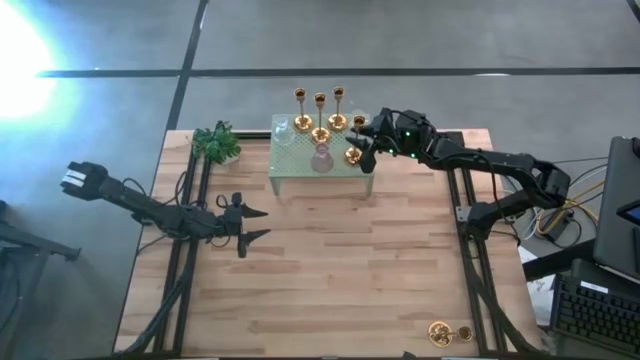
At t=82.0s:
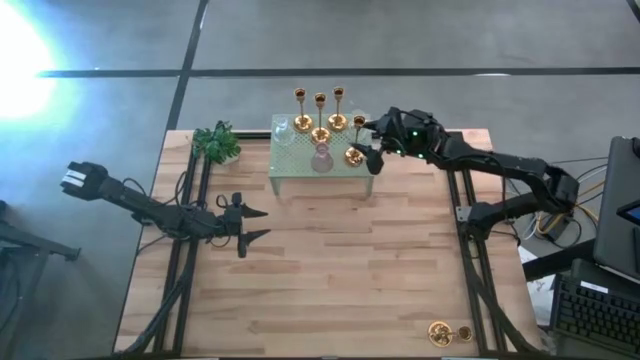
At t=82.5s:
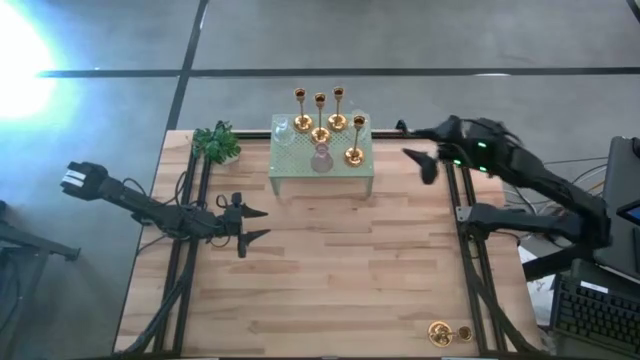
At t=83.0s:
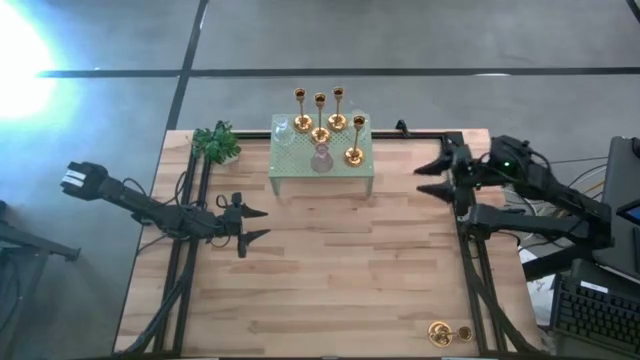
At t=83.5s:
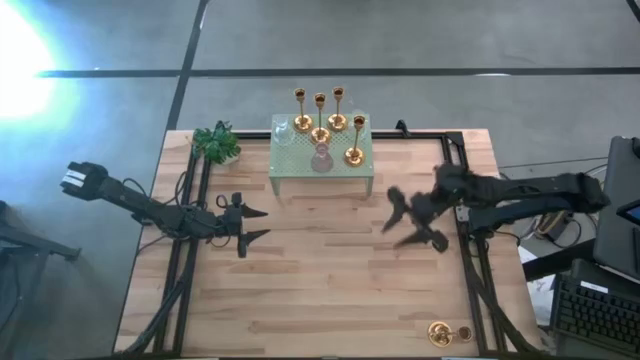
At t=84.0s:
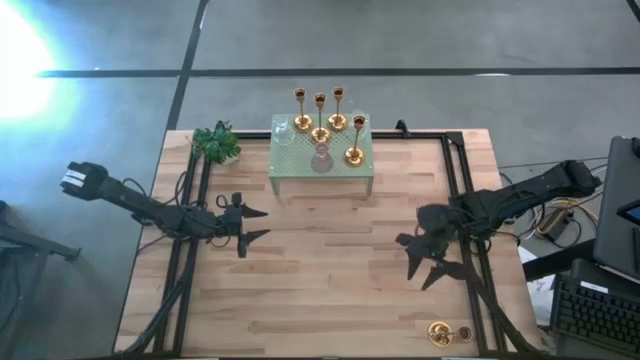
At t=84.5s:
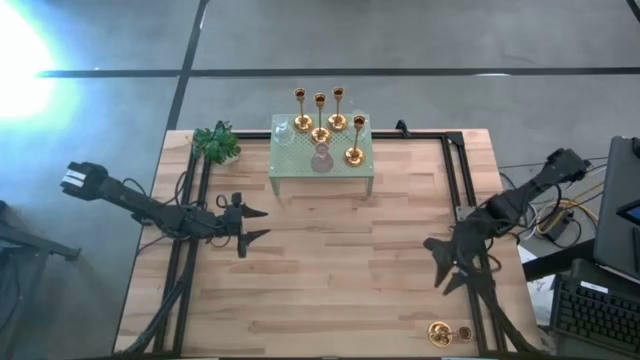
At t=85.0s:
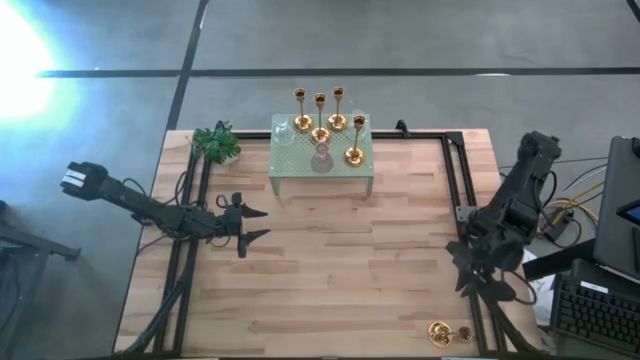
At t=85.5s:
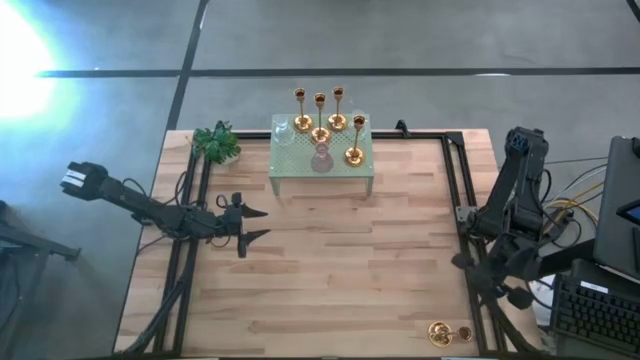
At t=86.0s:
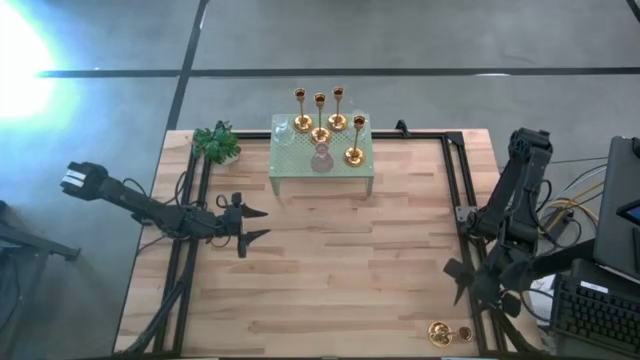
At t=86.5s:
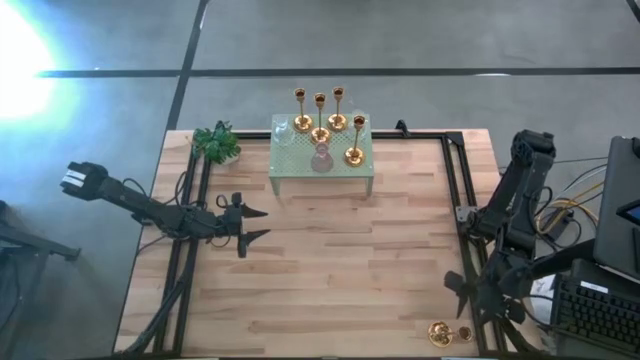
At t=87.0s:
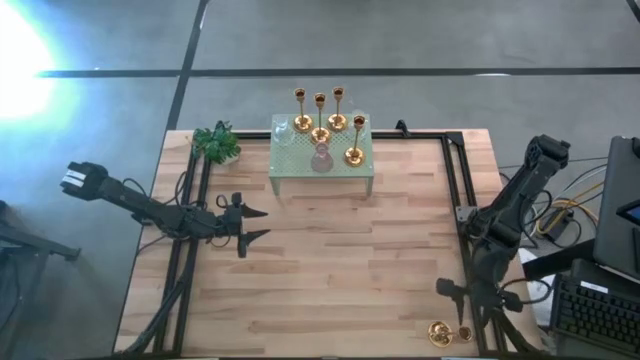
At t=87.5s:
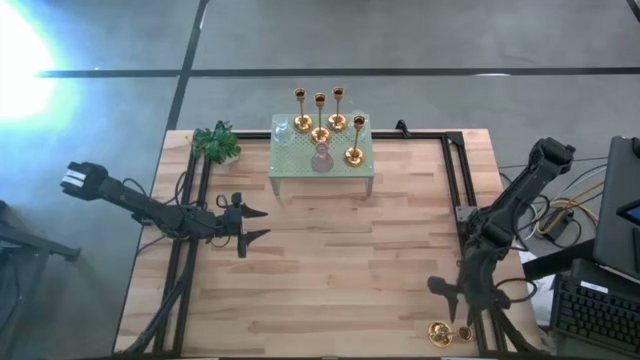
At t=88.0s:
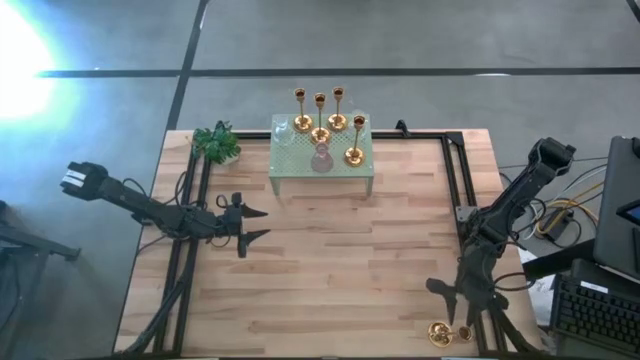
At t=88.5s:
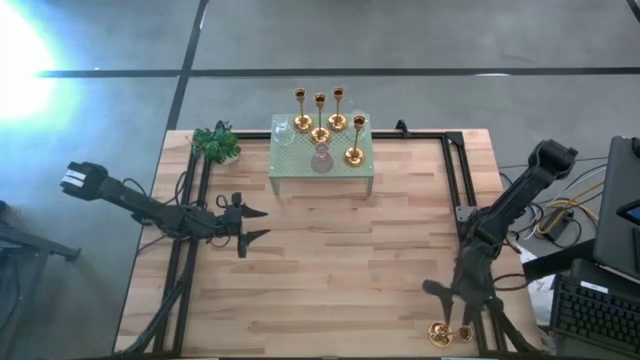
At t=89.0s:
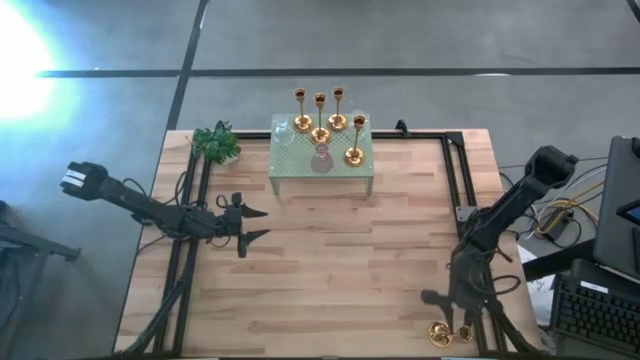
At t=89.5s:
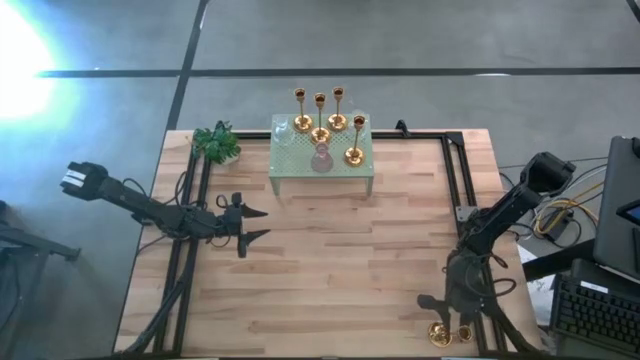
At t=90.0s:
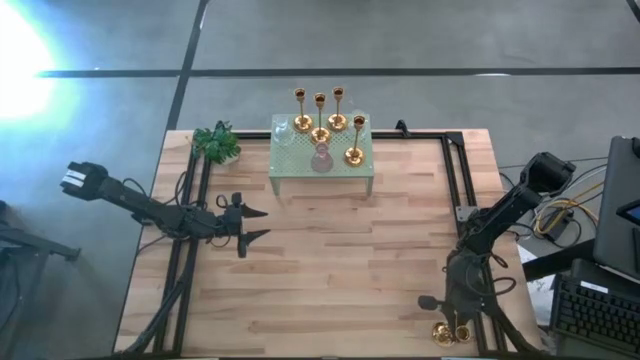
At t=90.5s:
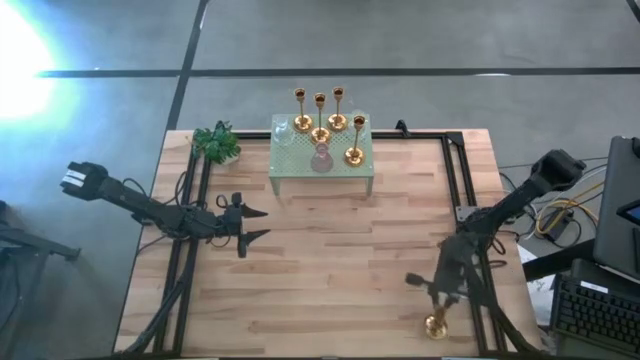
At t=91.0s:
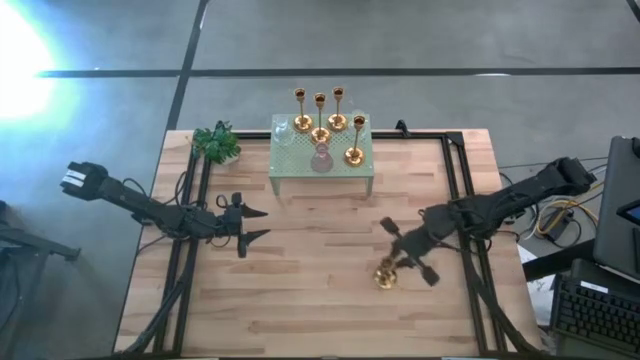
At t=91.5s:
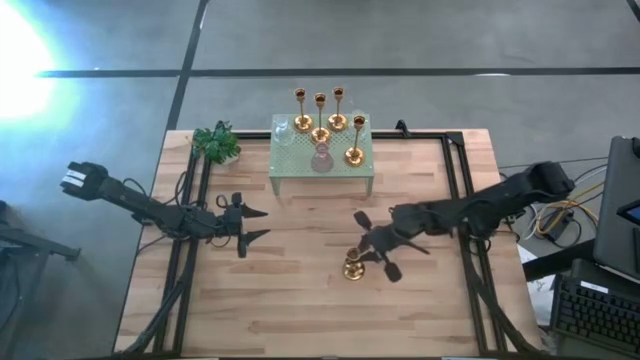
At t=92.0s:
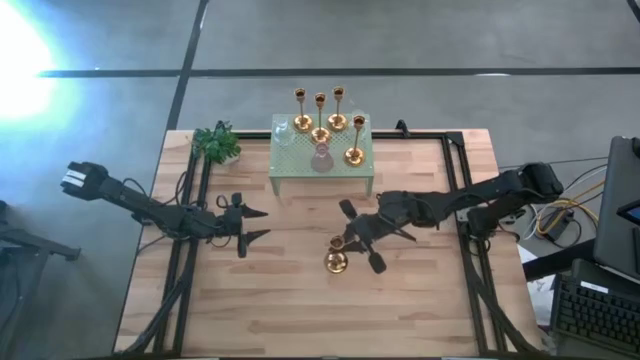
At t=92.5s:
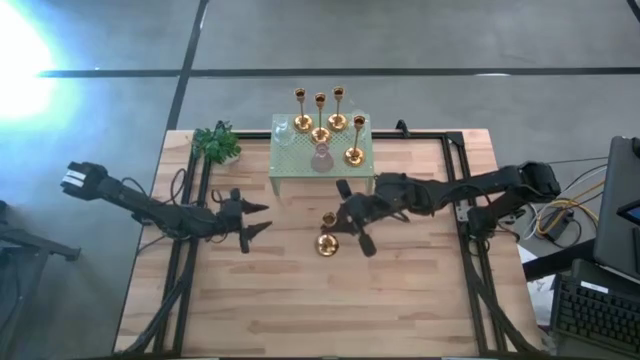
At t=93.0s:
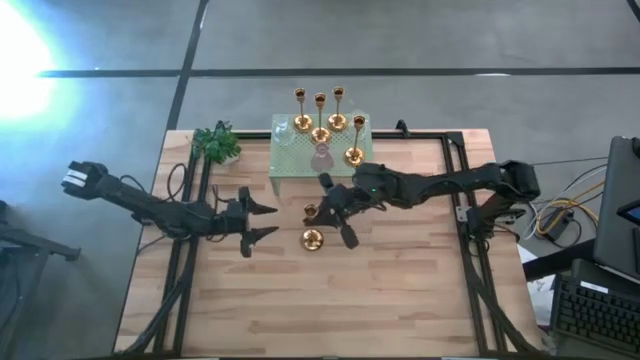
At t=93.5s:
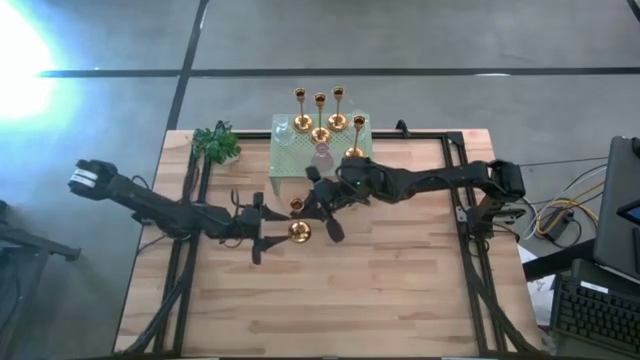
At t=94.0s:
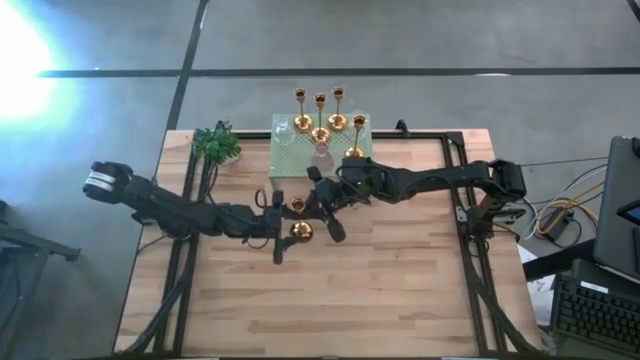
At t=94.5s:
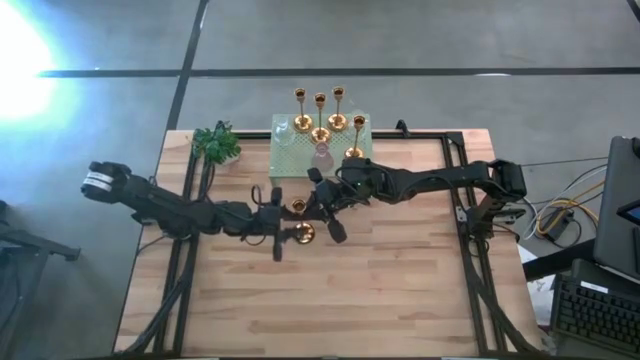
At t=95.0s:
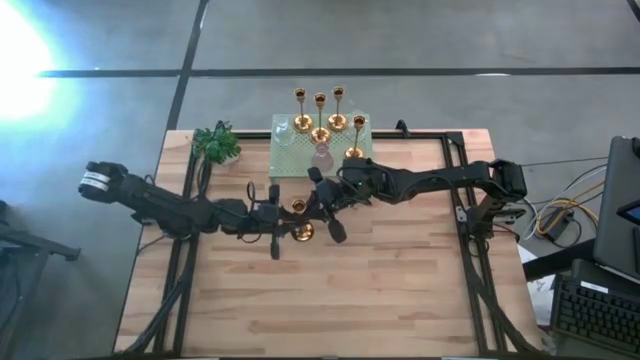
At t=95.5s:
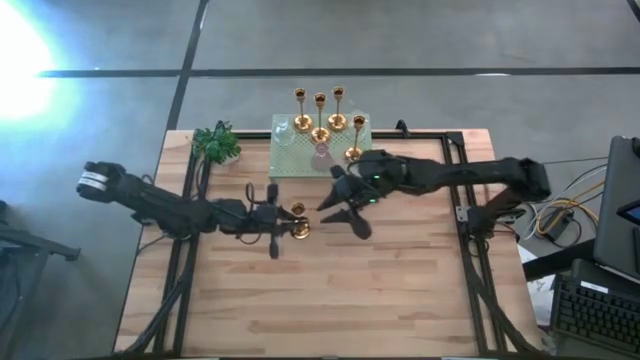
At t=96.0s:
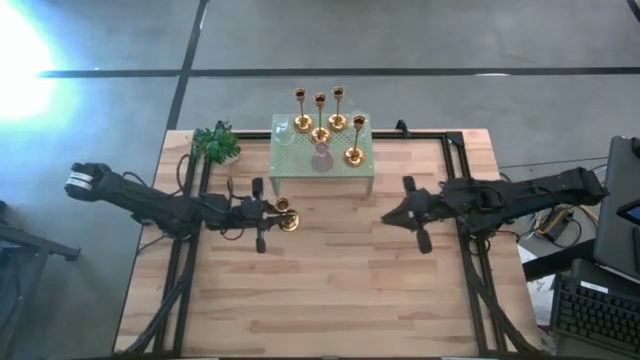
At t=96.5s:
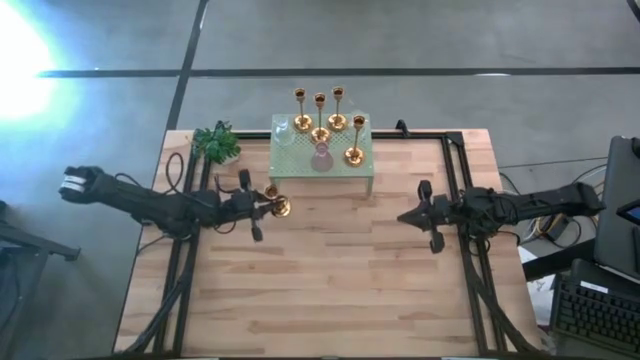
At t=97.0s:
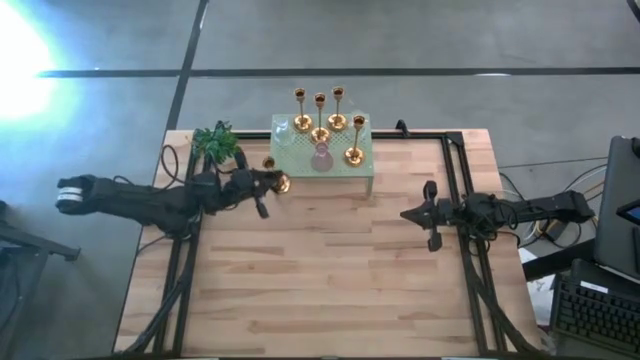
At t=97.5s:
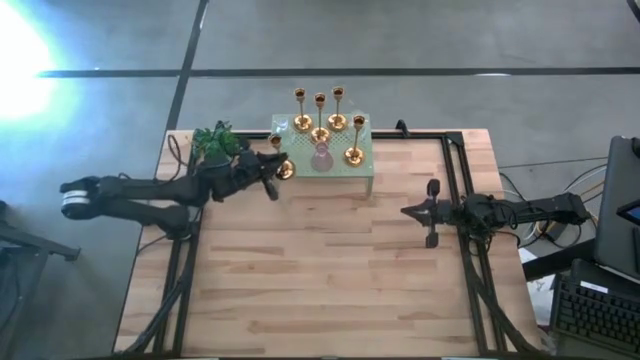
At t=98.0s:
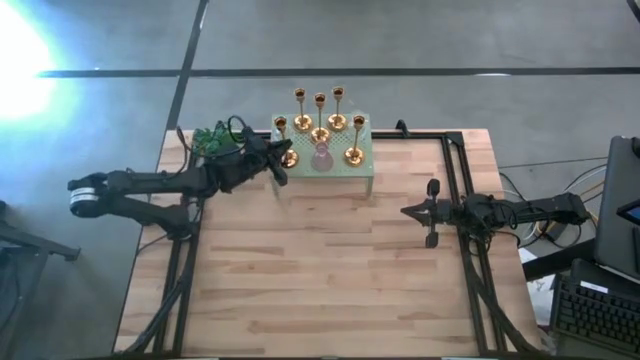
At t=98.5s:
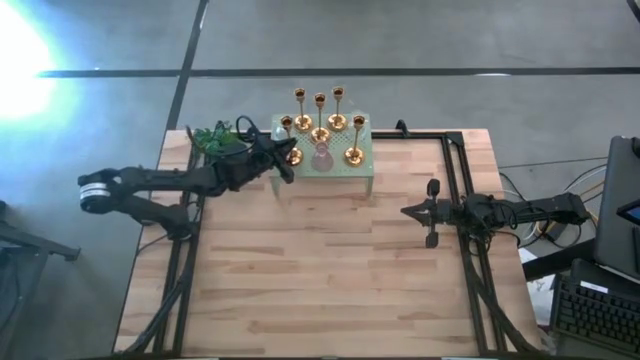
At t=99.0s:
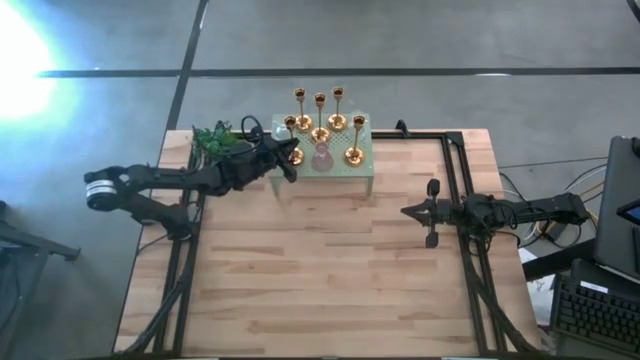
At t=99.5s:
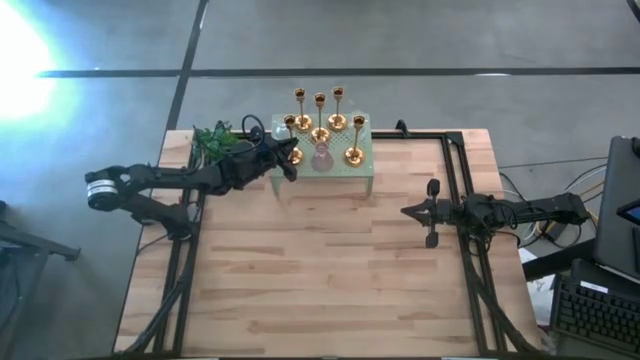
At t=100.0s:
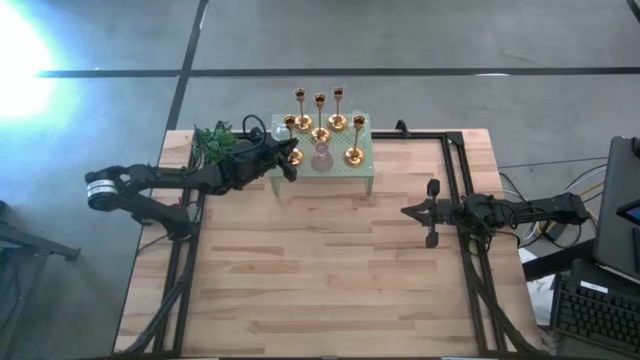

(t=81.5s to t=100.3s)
Task: Pick & Place candle stick holders
Put the gold candle holder on the shelf

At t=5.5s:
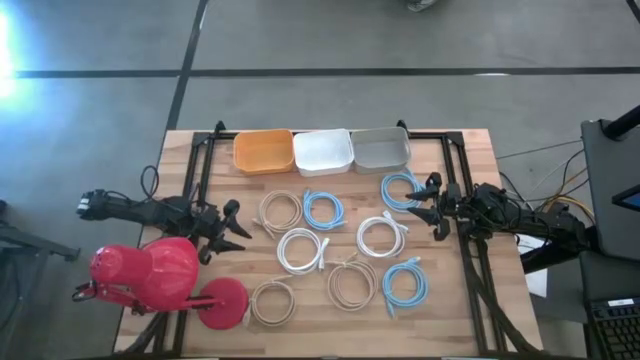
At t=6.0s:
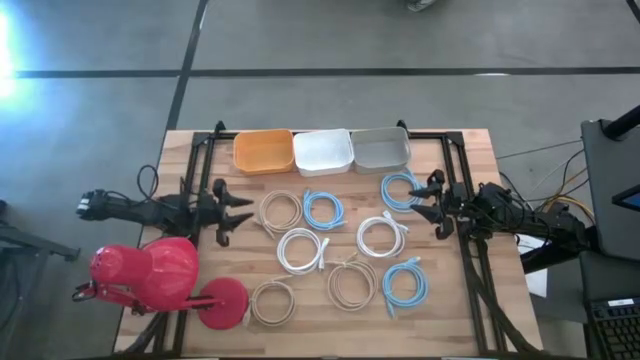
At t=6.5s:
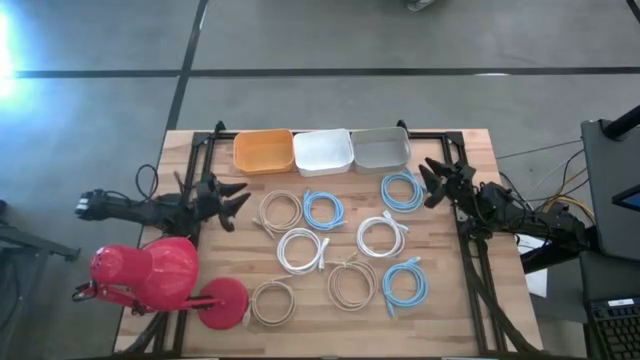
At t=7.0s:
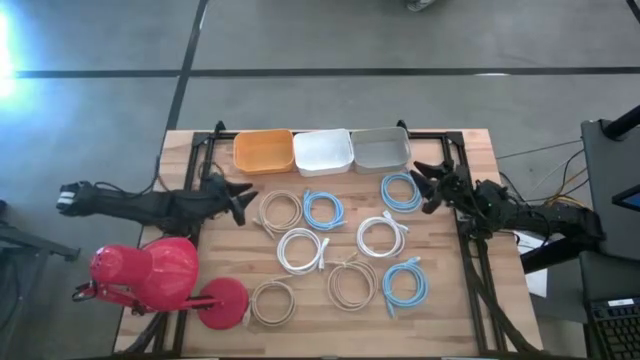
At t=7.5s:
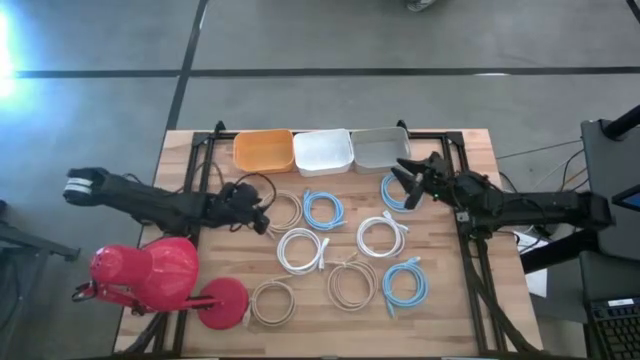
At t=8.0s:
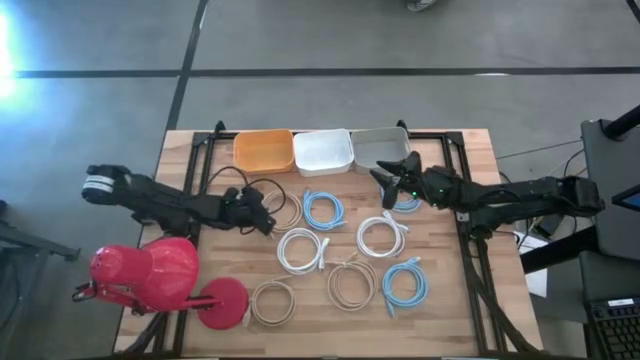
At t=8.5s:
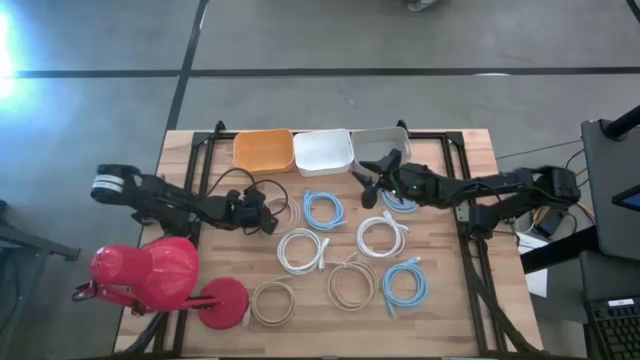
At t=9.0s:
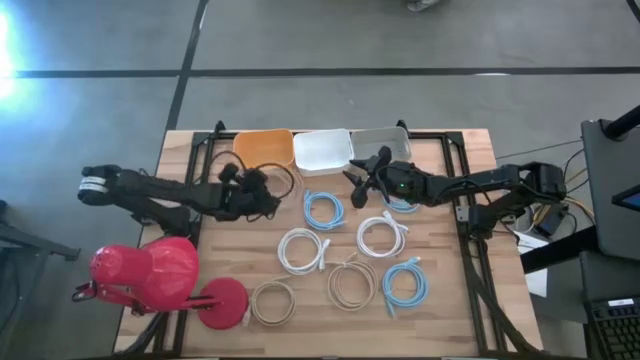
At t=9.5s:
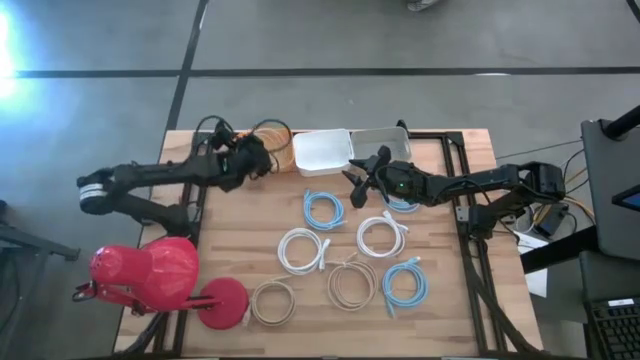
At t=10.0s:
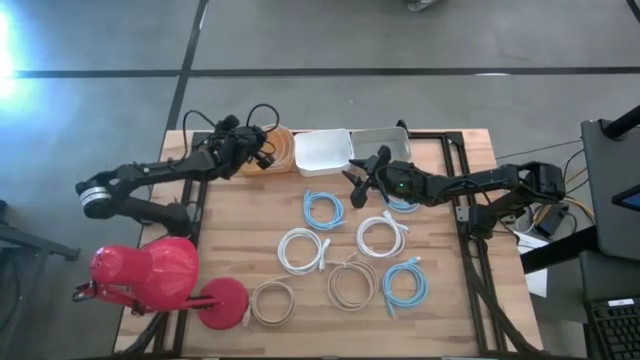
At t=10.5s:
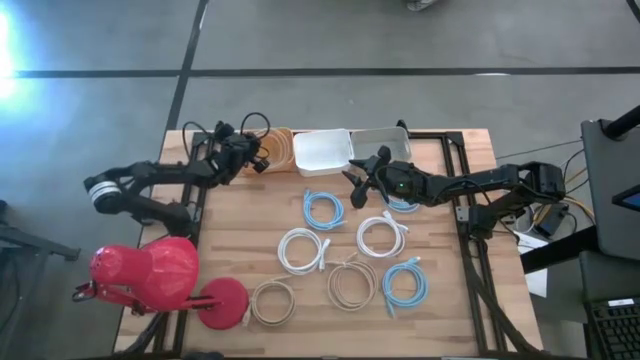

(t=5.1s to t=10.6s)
Task: Sort HDMI cables
Put the brown hdmi cable into the yellow bin
